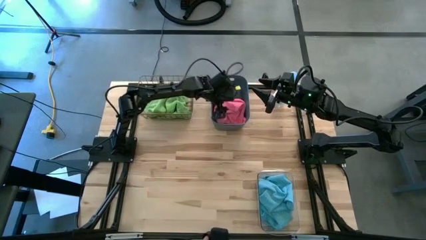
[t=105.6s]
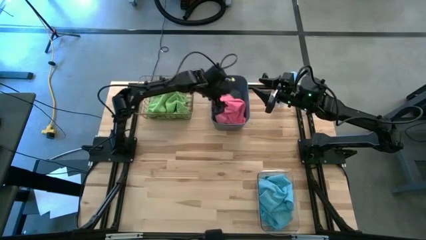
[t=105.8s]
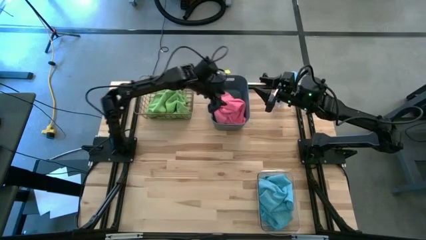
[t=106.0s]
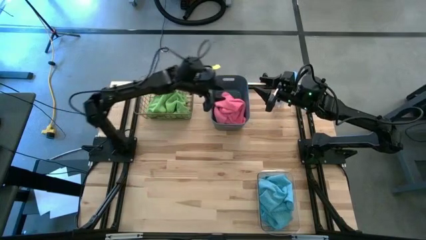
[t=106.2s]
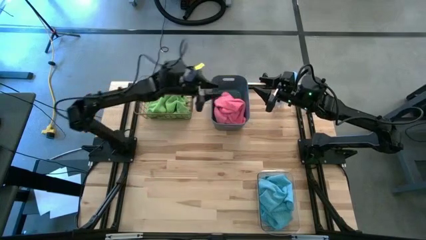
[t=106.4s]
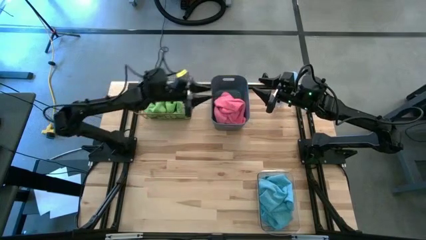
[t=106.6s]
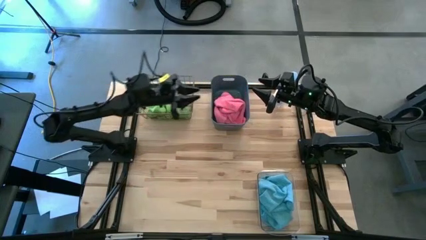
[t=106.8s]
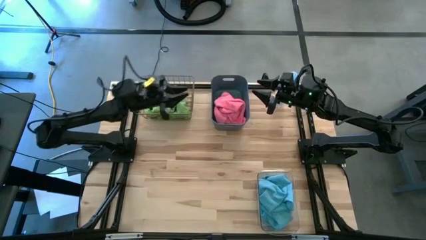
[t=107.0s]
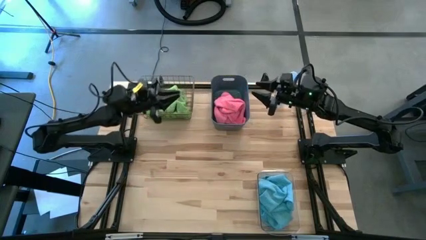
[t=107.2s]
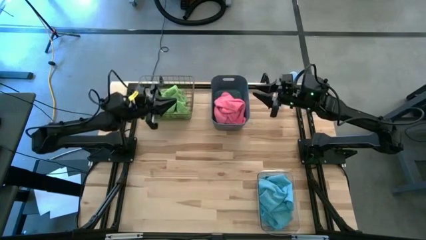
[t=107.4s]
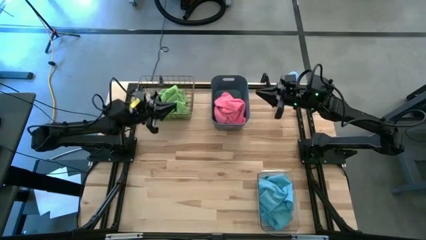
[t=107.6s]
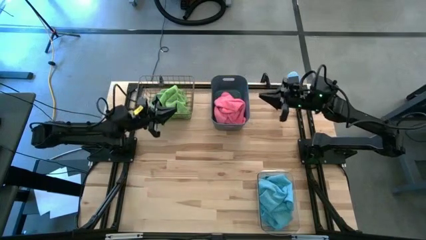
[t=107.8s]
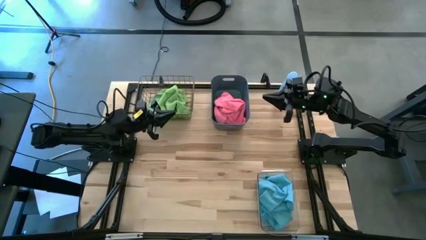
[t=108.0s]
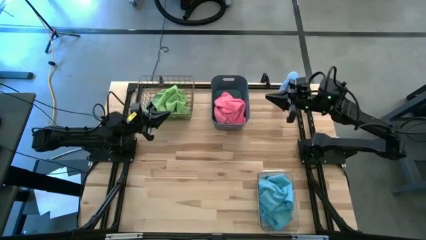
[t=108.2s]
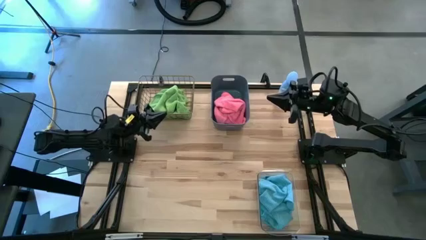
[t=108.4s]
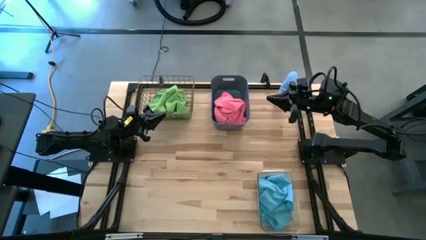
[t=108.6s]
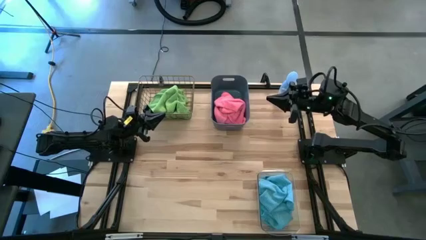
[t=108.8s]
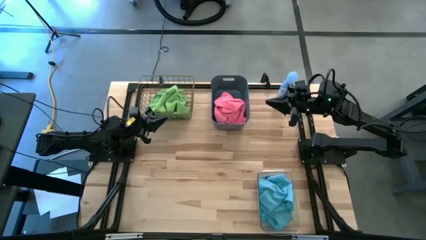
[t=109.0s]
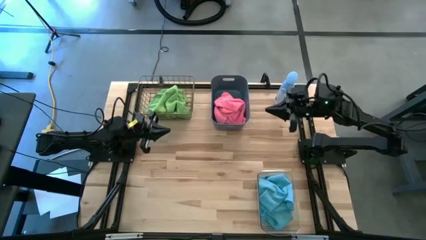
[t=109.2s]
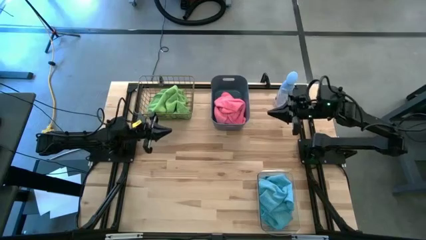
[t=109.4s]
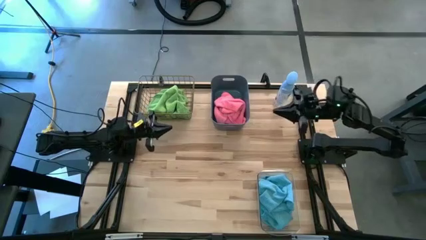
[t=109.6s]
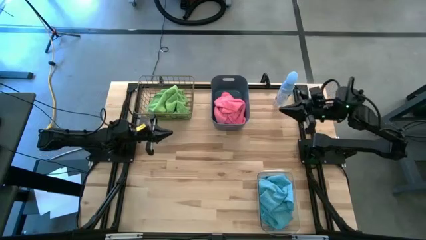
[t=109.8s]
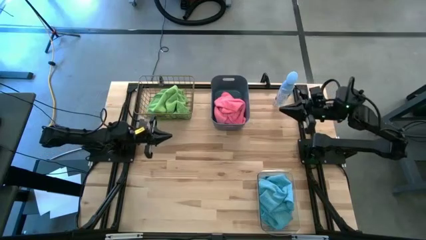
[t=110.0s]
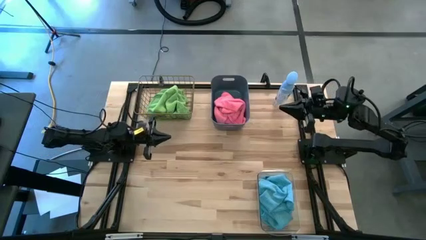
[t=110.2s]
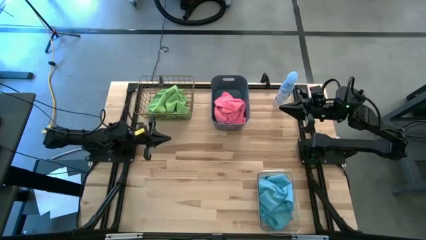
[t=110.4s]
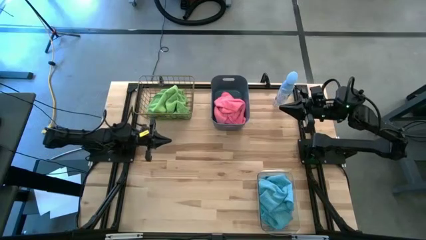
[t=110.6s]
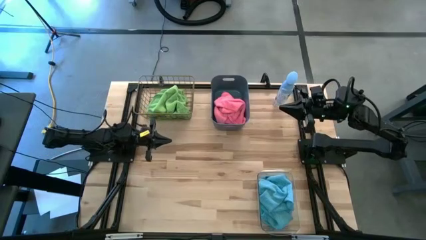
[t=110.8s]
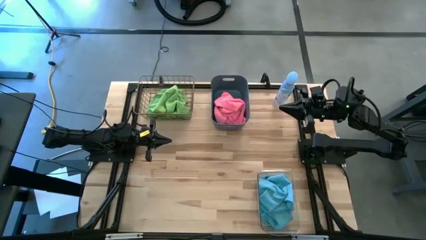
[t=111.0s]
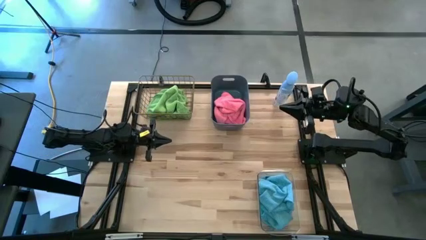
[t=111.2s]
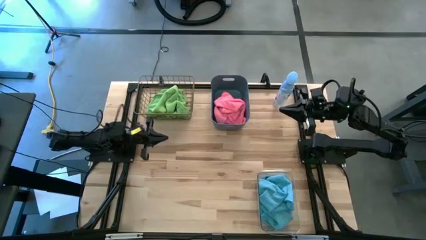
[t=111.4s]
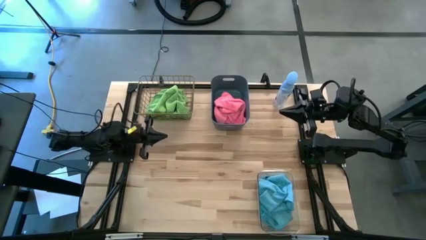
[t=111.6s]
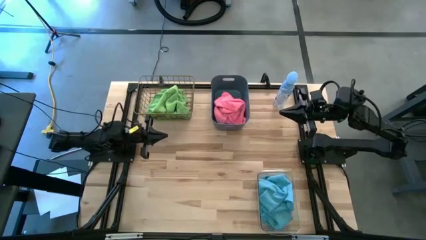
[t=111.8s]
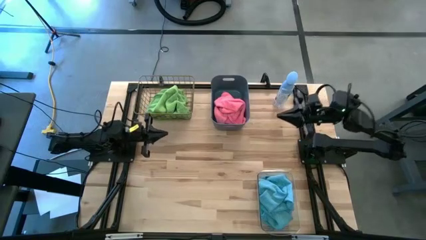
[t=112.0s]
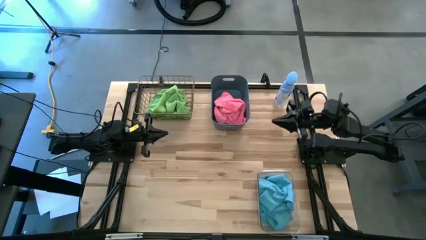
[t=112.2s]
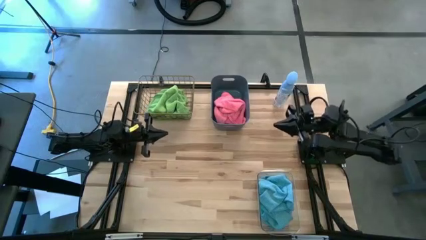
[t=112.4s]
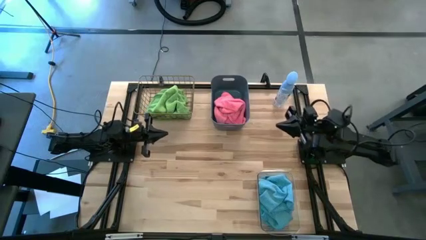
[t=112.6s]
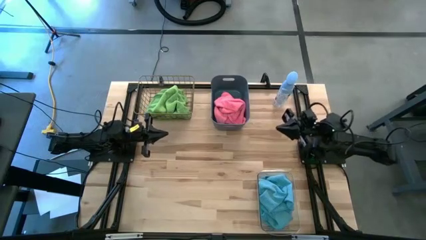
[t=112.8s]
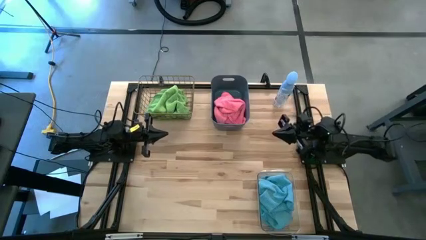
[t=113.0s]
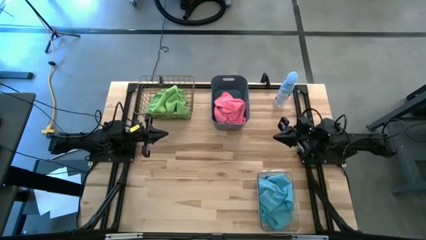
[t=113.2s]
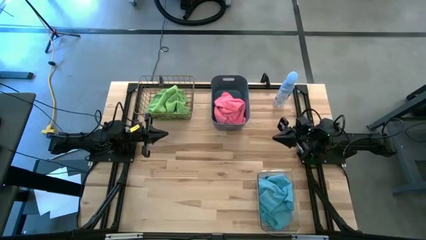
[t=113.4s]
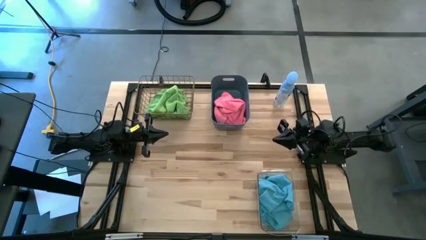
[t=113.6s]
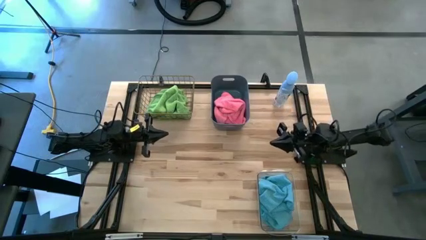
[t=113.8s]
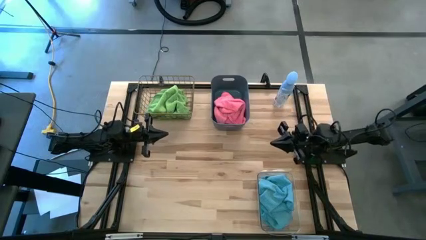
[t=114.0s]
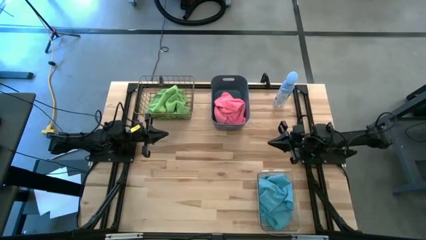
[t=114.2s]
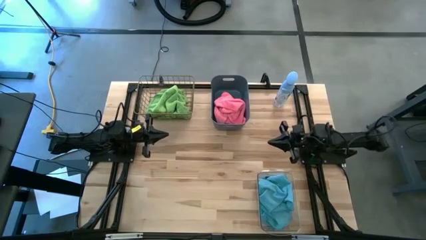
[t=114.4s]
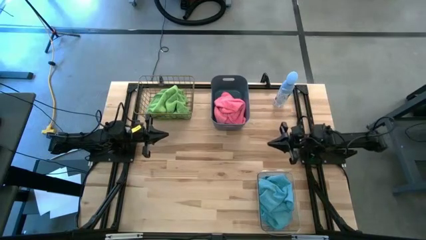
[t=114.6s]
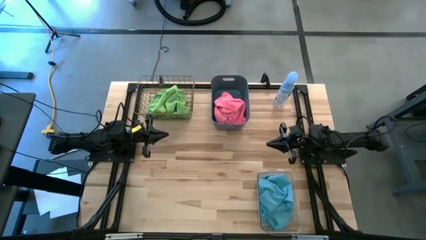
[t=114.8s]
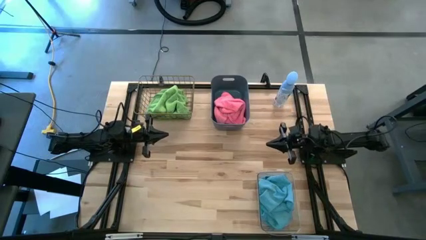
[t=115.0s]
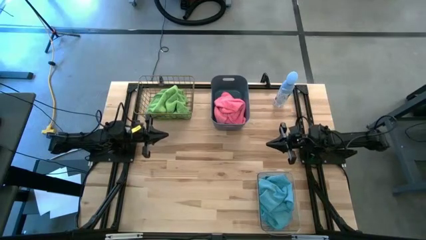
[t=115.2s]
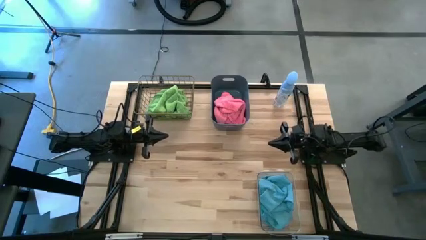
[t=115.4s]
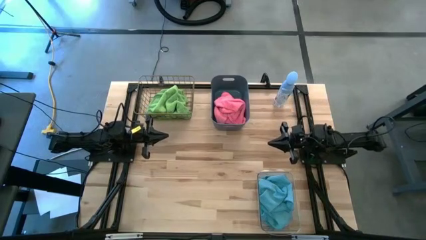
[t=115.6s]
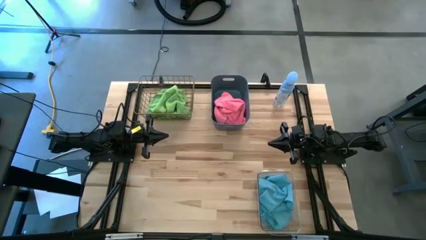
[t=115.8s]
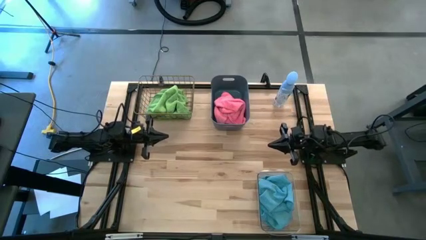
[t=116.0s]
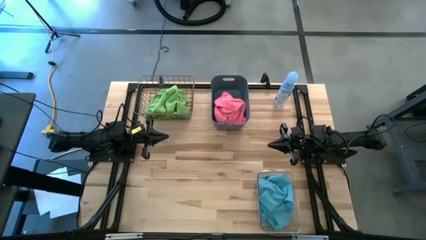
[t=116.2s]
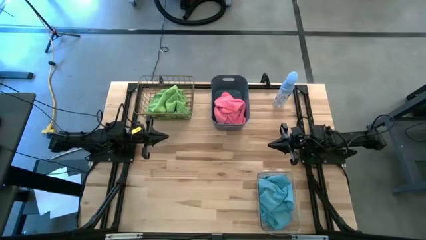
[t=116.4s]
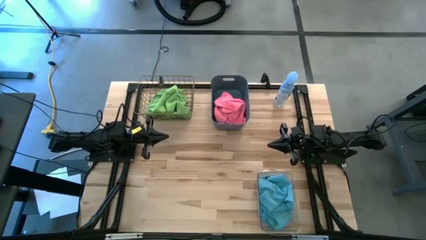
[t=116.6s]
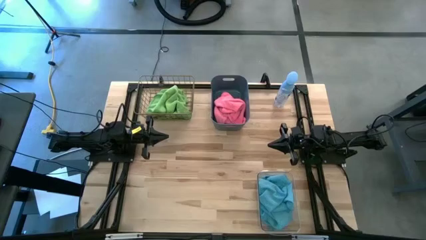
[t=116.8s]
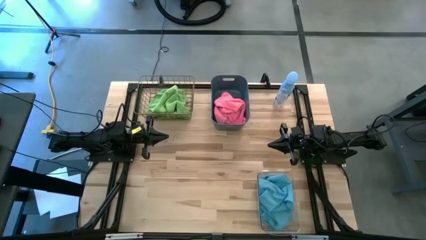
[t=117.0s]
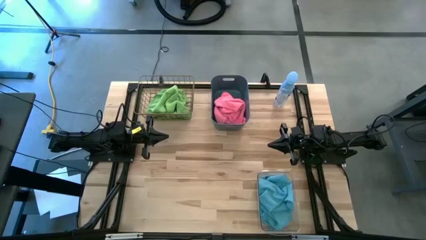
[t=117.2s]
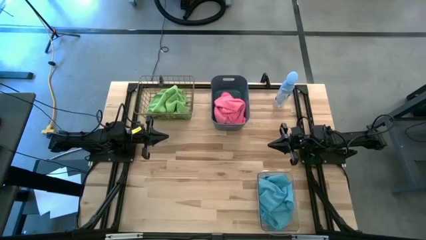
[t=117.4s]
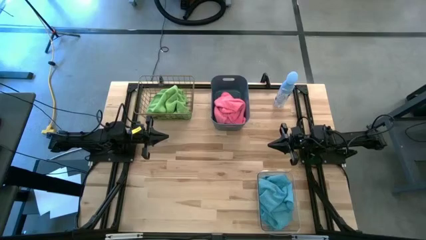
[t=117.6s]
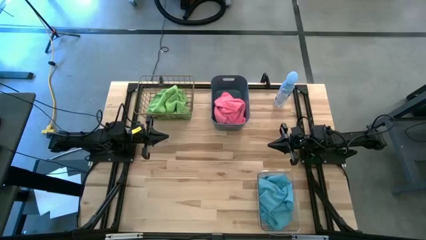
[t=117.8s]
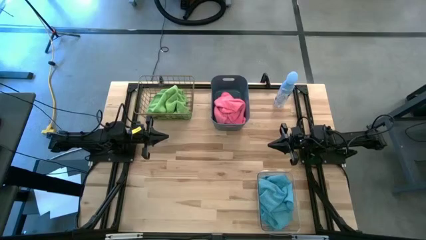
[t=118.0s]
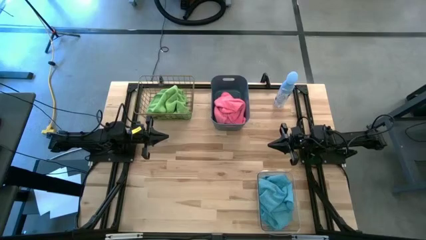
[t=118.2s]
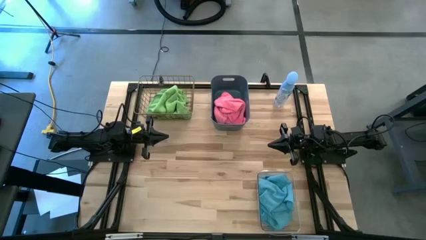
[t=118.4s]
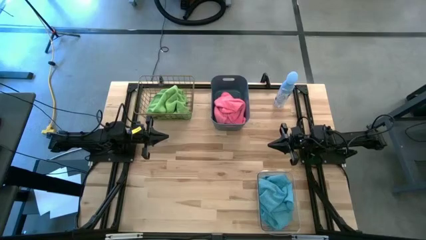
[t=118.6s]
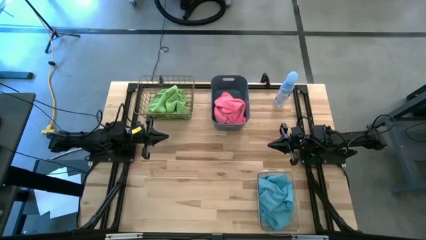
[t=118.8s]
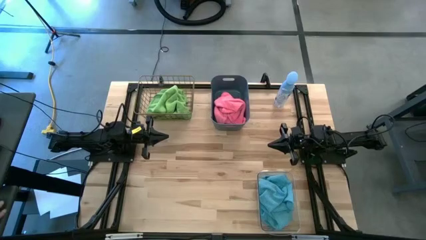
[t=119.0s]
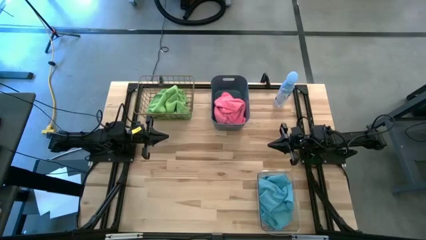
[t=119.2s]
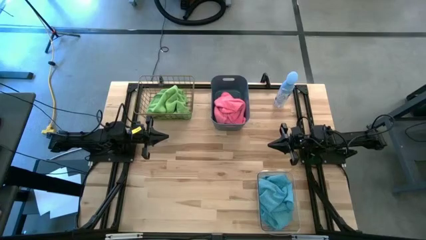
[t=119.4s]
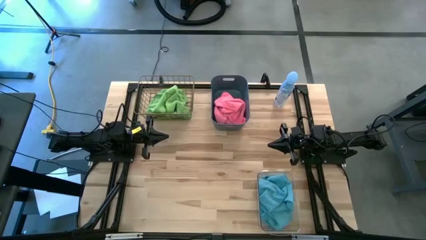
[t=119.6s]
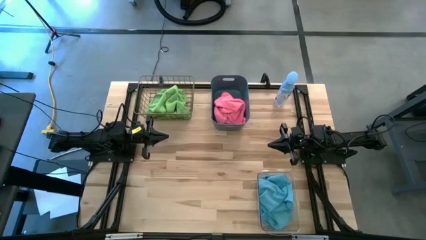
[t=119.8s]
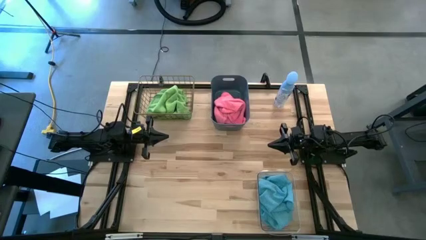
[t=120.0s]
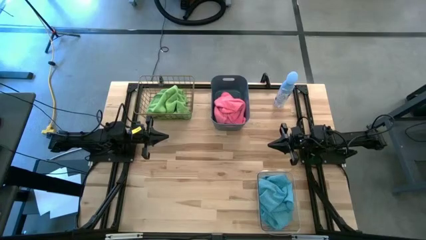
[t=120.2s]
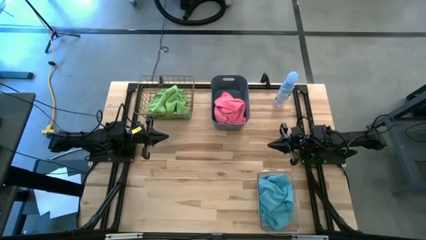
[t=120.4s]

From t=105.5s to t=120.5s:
Task: Sort microfiber towel by color & place in baskets
Return to Home Position

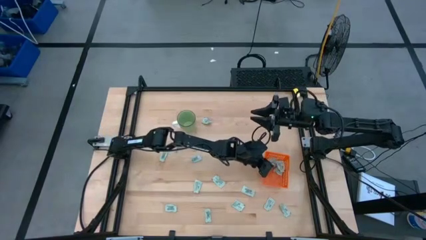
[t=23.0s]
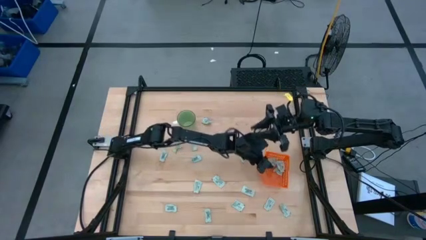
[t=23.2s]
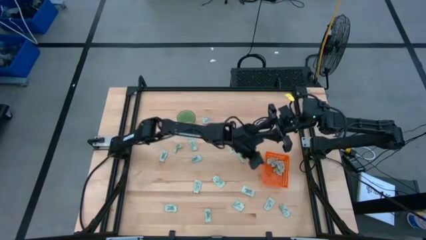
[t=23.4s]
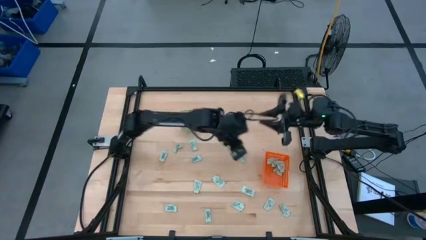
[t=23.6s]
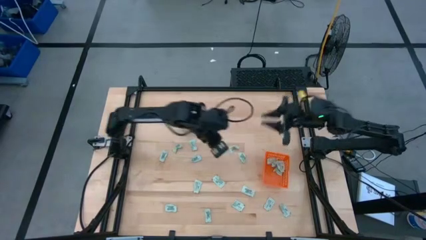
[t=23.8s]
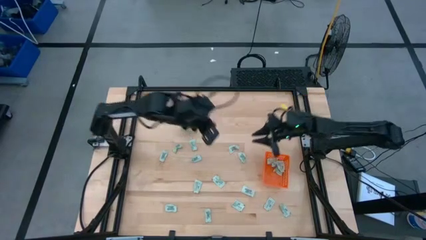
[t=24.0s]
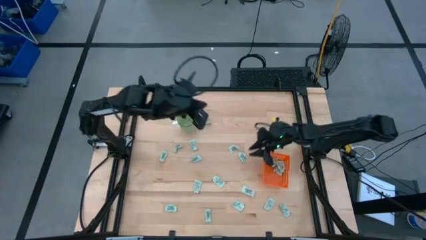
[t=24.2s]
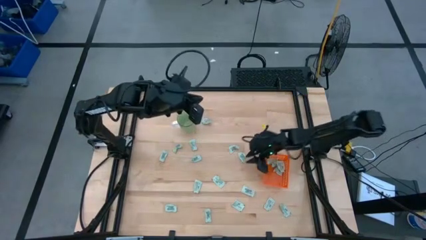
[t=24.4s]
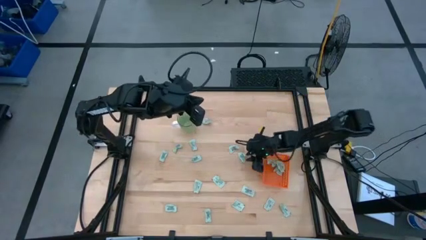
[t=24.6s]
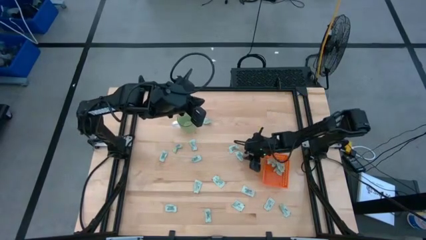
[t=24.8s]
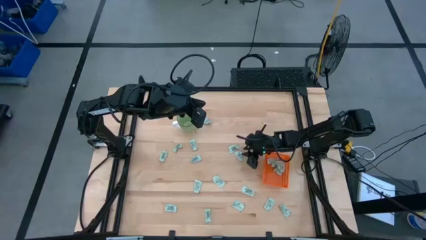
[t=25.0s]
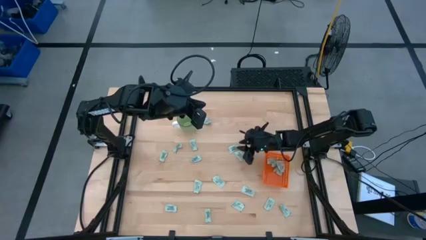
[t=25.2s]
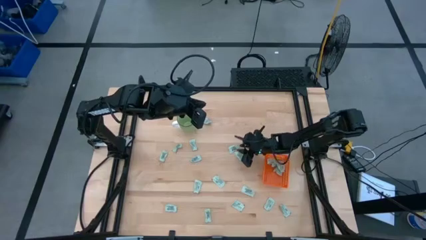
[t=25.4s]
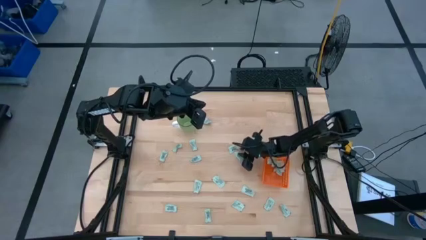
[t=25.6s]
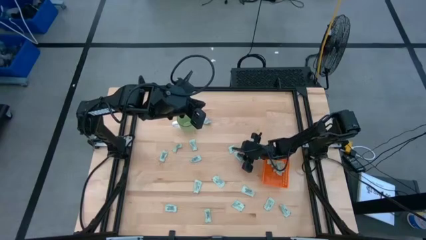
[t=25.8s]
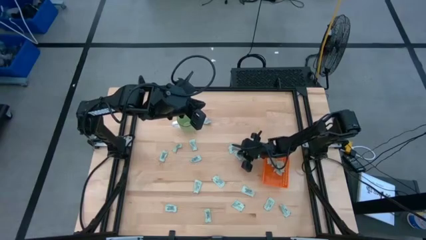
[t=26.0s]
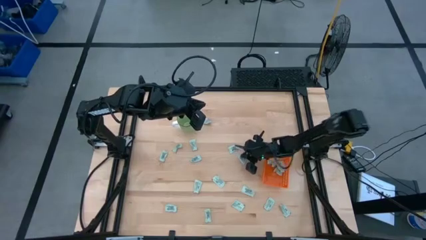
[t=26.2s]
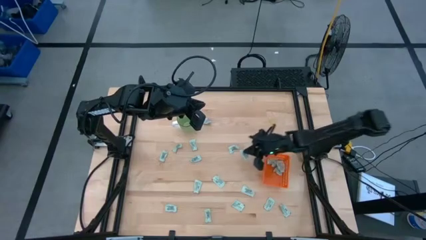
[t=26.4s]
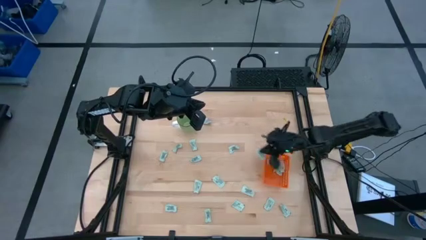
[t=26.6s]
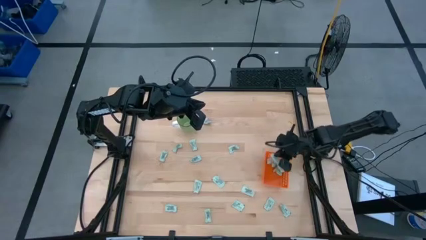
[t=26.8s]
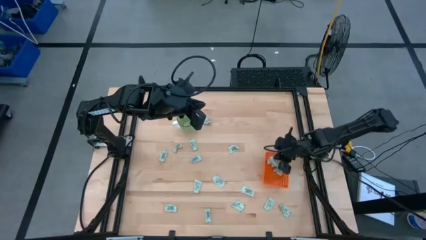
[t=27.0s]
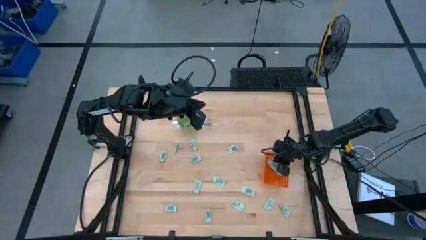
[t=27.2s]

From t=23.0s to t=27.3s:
Task: Pick and place Stevia / Truvia into bins
Put the stevia packet into the orange basket
